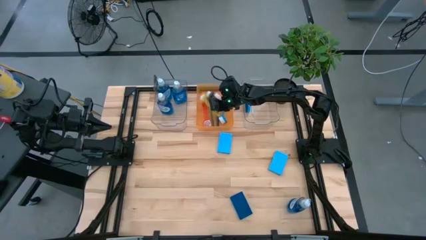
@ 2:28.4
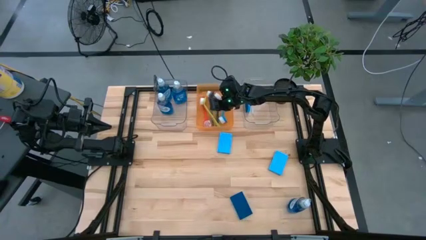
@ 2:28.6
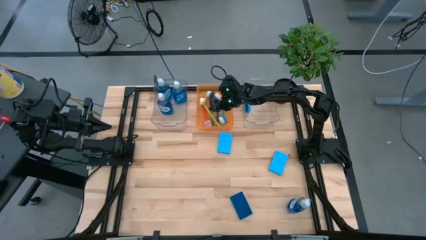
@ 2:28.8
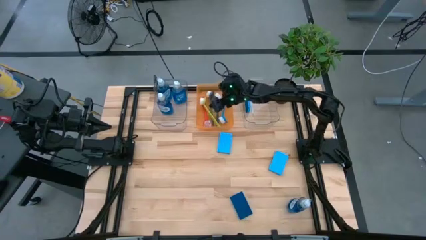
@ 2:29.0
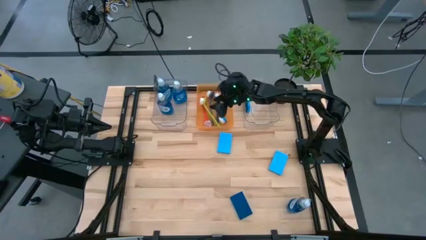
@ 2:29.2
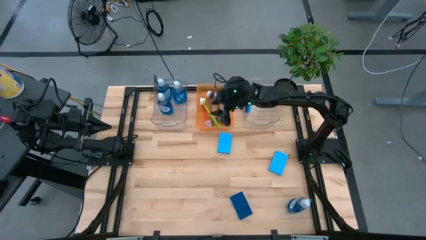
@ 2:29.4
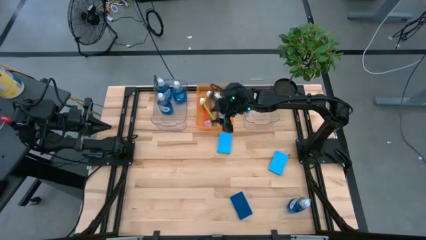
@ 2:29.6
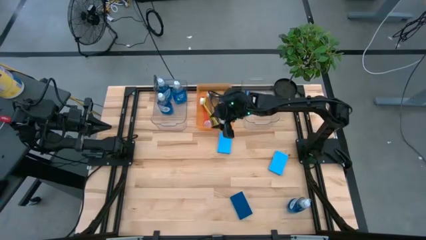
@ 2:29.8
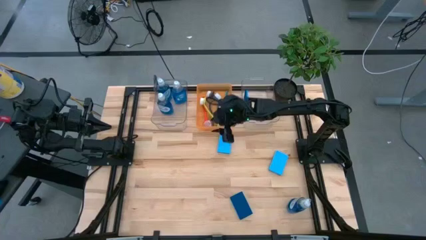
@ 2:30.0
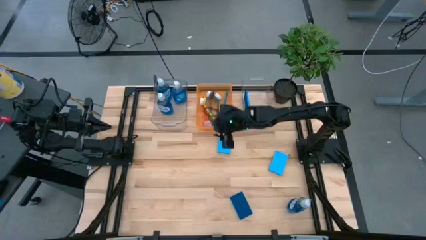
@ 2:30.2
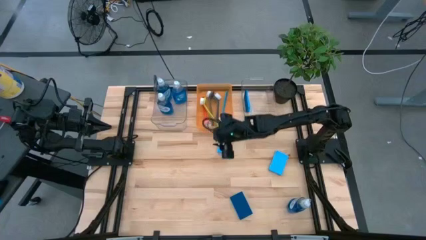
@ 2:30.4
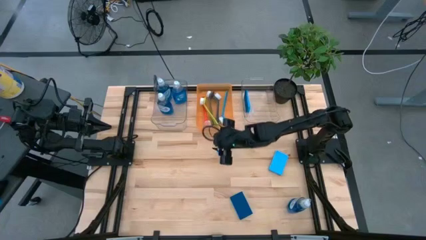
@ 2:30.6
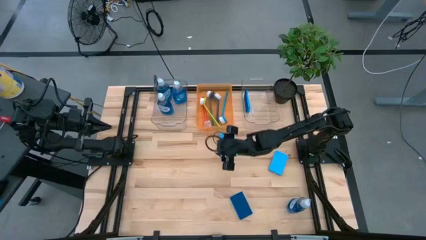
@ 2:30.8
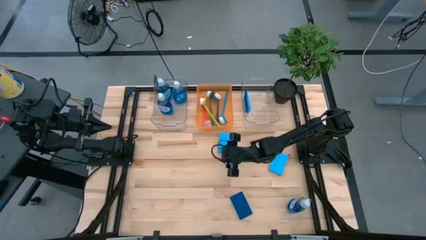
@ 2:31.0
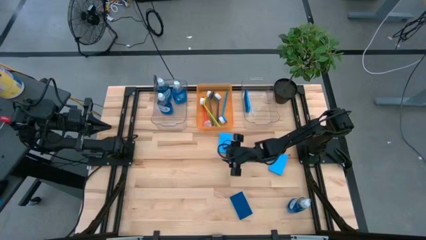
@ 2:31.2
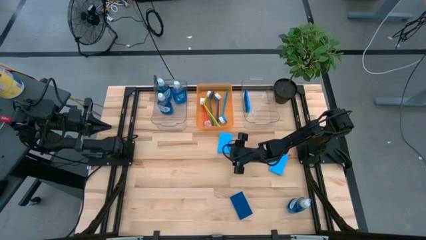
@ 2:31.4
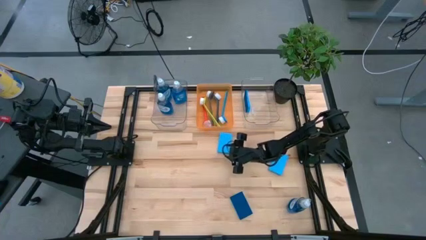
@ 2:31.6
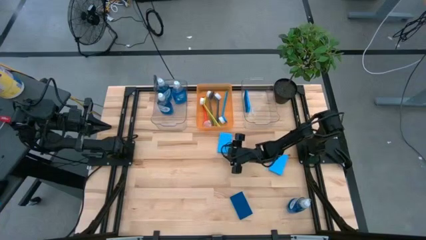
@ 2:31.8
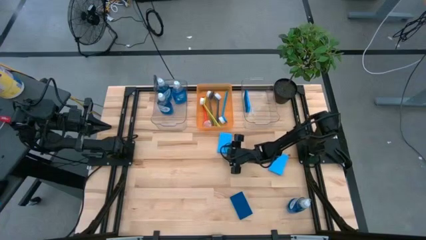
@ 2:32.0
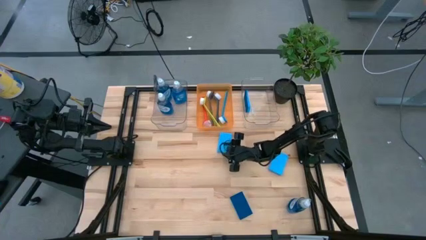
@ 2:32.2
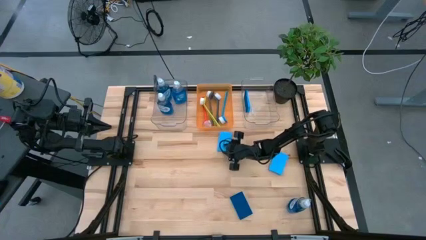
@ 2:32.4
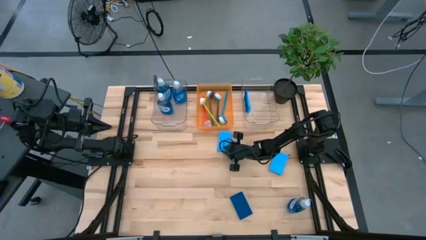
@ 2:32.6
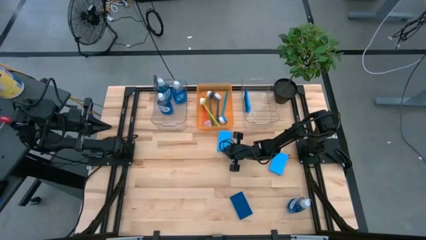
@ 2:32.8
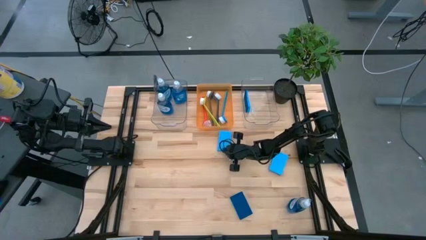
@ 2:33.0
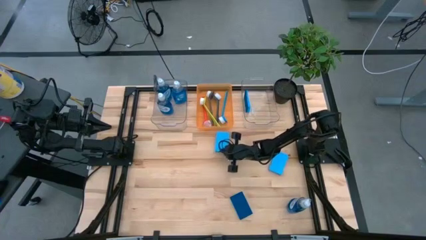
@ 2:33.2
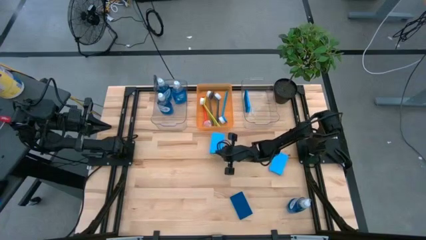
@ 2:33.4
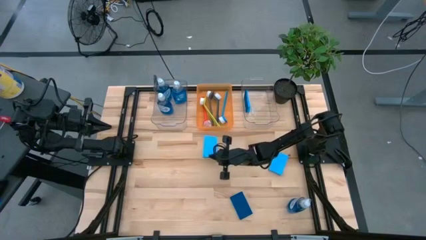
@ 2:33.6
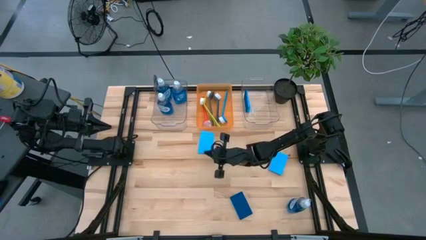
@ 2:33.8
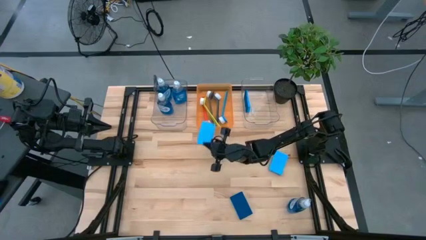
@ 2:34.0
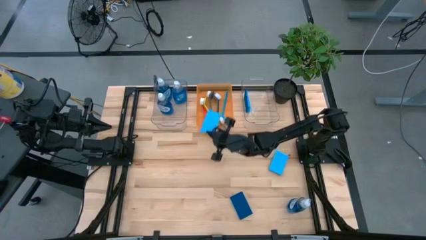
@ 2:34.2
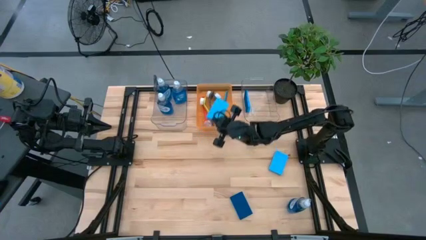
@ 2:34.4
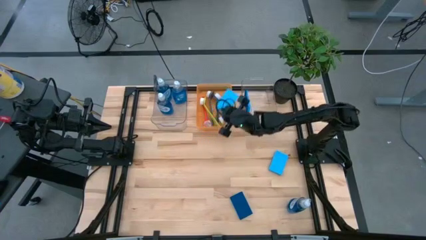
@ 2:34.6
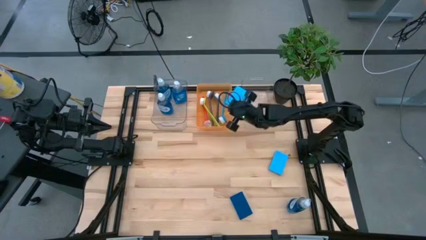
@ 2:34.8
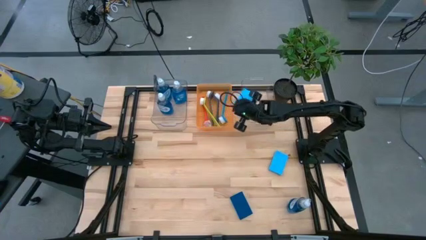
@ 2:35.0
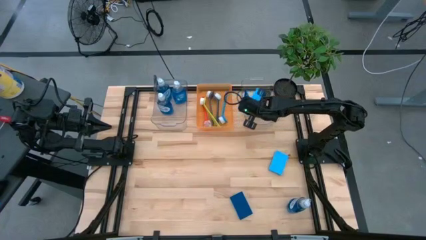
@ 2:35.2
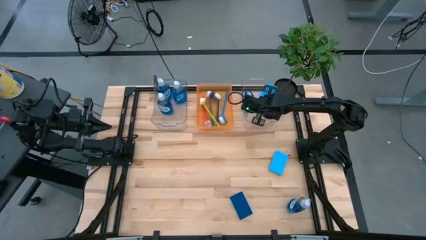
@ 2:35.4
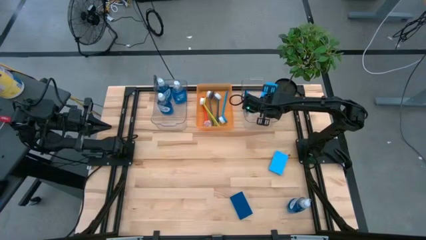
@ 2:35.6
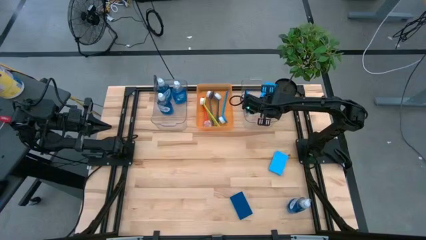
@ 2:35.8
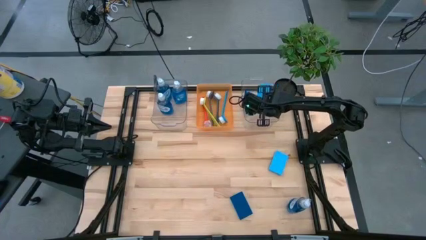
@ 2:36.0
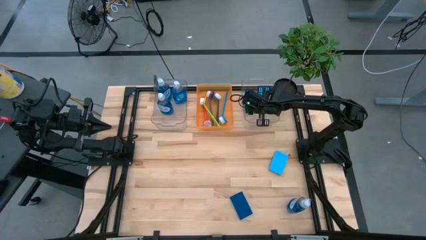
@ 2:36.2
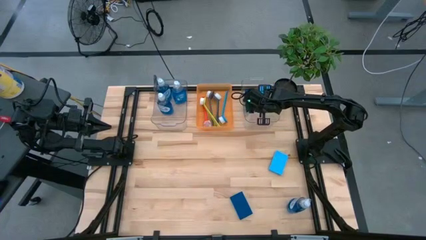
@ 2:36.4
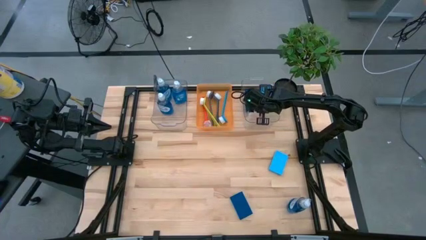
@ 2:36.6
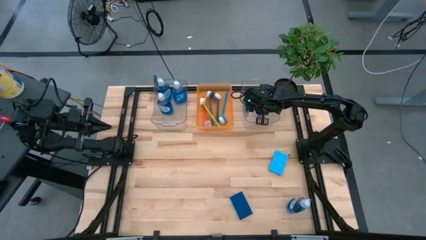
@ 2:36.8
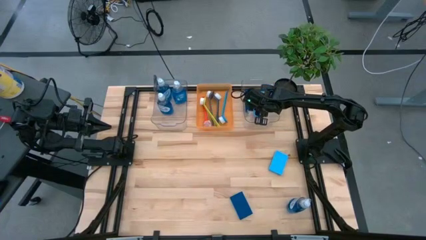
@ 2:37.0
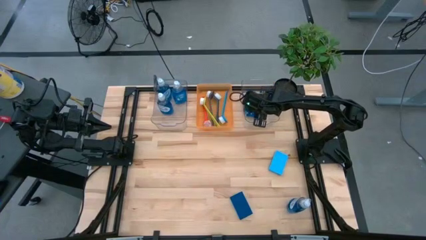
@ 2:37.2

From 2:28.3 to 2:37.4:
Task: Pick & Place Kitchen Sink Supplies
Put the blue sponge into the right transparent bin

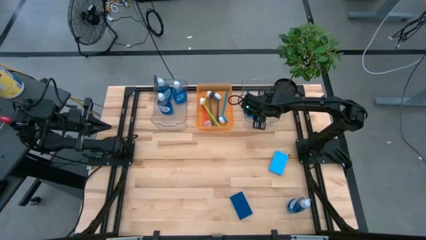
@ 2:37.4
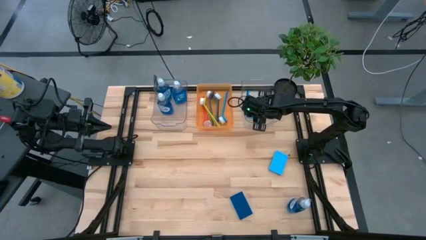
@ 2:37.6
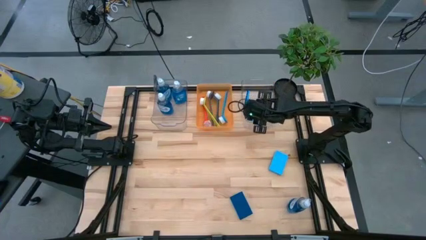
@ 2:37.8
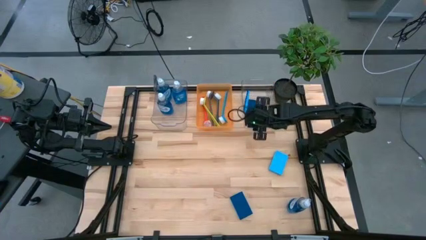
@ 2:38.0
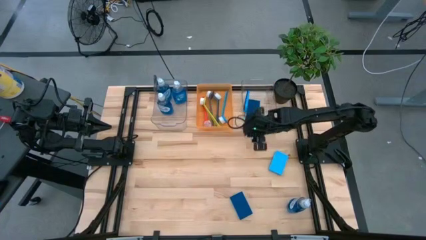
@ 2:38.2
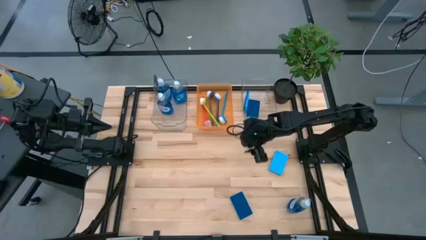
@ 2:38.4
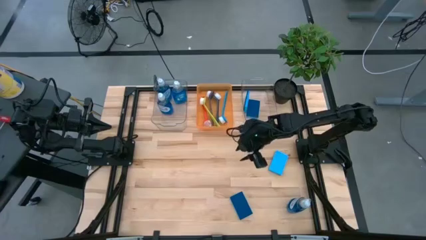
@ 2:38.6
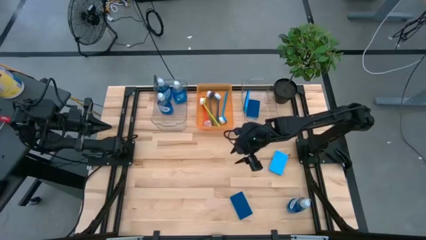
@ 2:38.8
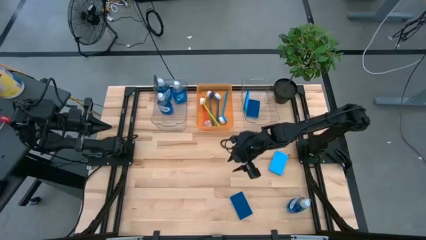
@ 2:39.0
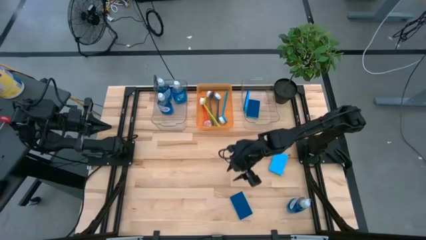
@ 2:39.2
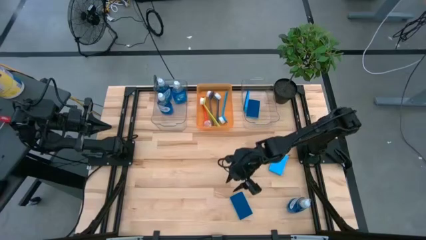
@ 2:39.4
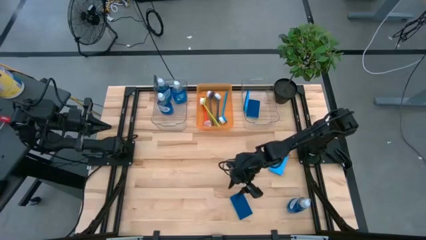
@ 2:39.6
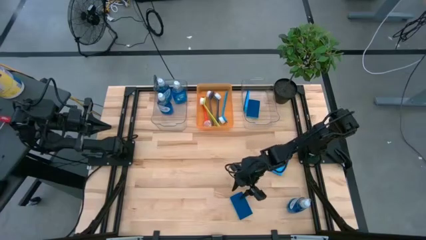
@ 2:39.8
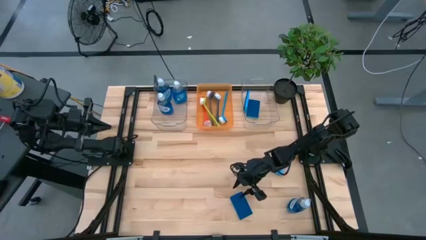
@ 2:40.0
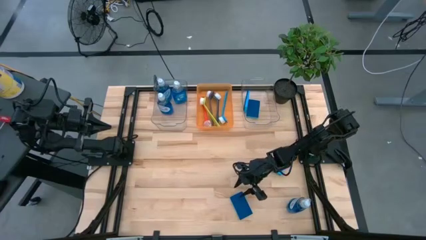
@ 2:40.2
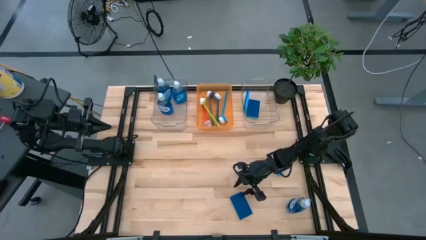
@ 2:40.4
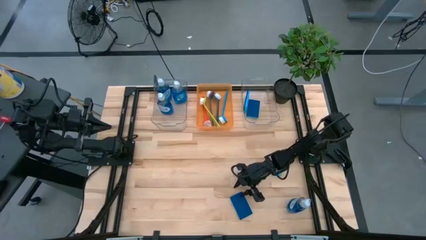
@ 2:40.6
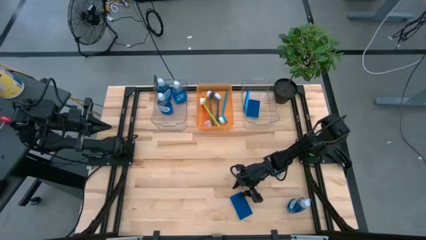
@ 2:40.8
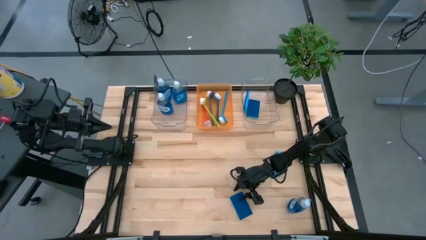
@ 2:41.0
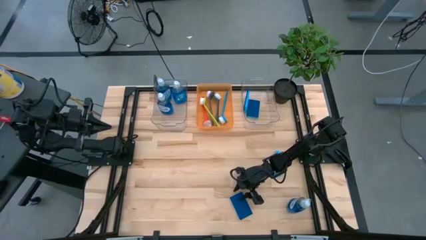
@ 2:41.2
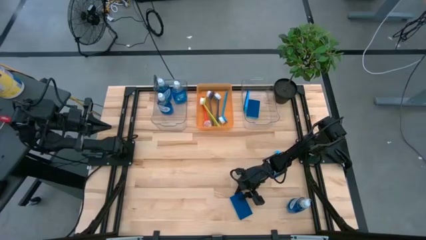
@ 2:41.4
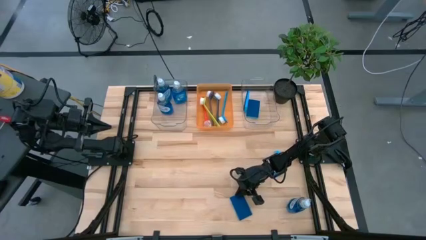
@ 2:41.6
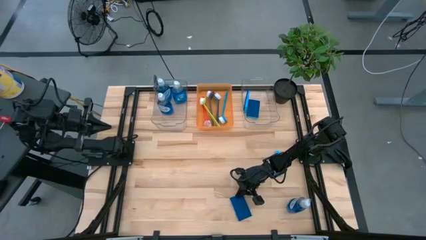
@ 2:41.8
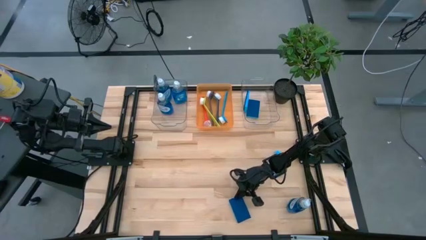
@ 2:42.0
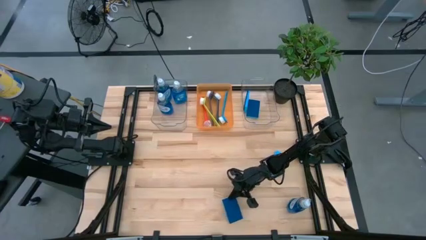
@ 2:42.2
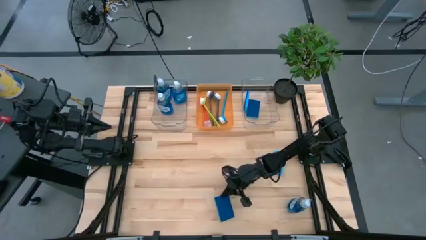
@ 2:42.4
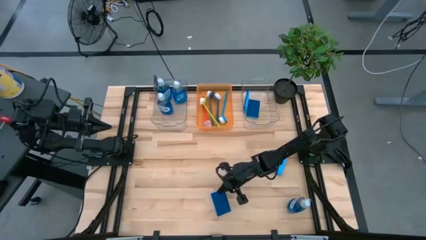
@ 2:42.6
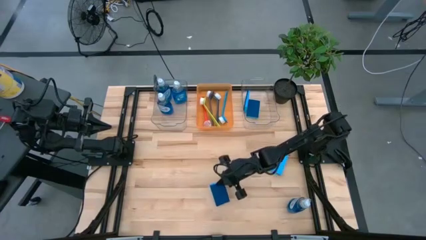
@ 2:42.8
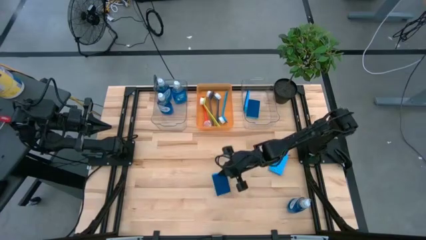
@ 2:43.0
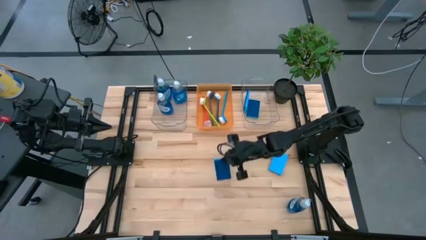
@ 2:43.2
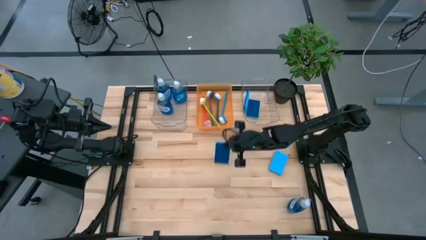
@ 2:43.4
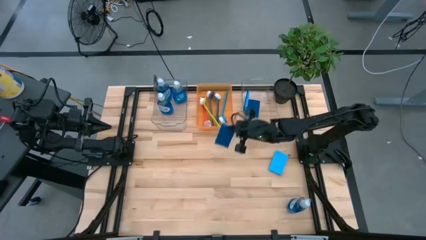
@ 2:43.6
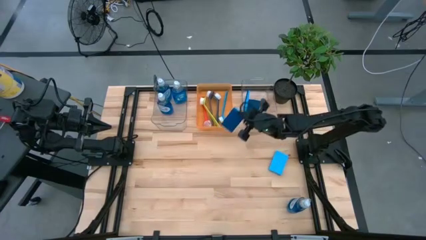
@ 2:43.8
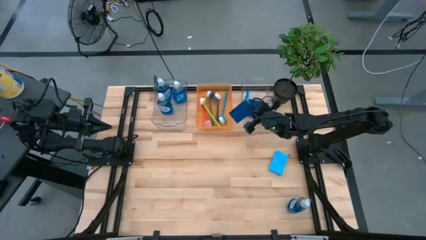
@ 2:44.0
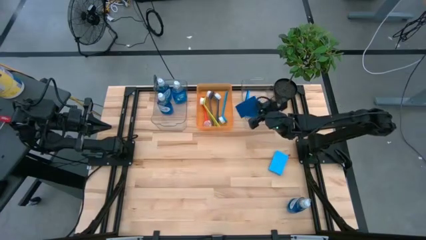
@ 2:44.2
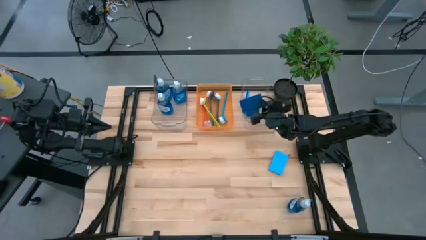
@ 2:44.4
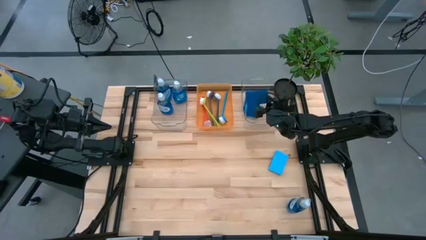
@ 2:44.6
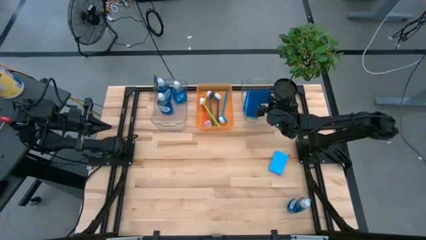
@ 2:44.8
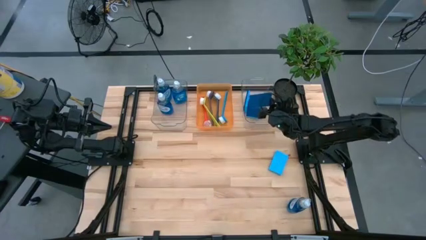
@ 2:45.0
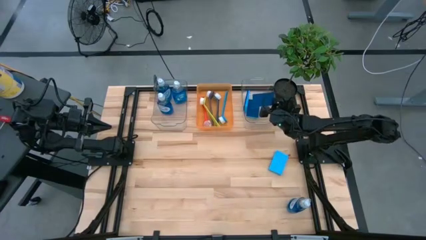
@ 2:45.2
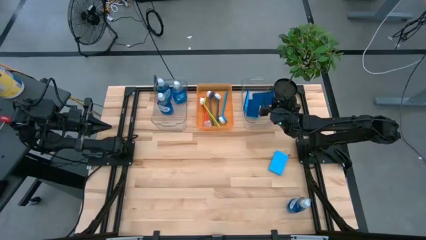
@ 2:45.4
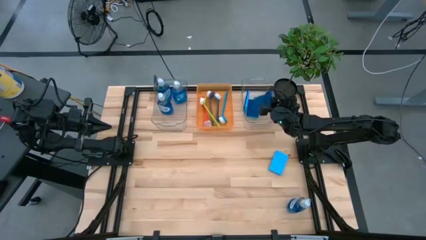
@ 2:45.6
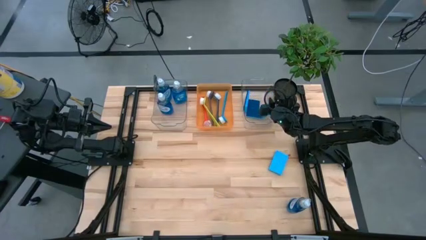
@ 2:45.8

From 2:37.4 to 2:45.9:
Put the blue sponge into the right transparent bin
